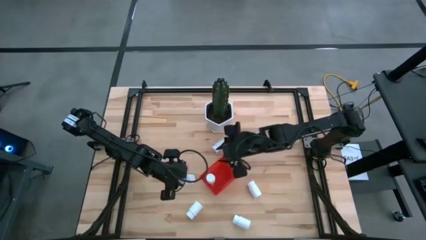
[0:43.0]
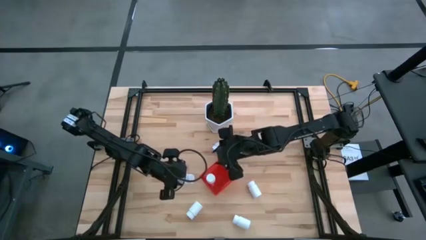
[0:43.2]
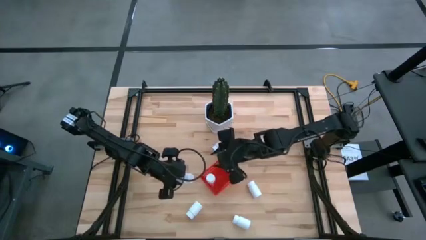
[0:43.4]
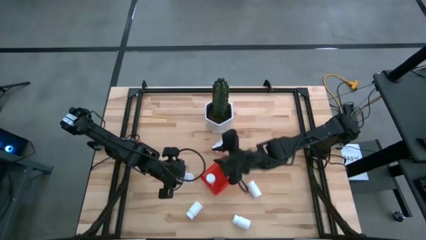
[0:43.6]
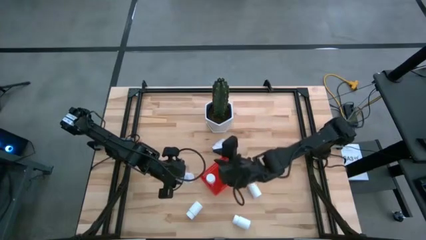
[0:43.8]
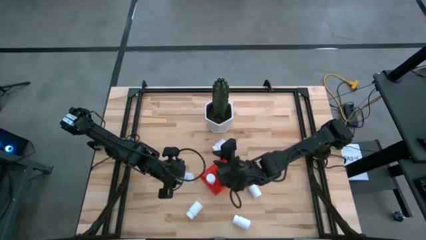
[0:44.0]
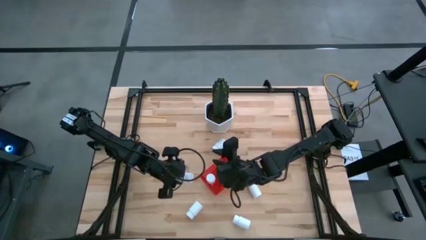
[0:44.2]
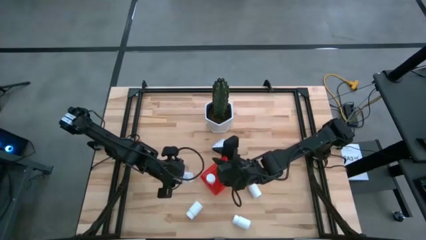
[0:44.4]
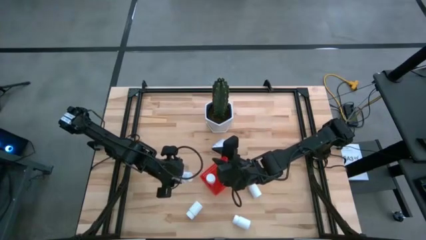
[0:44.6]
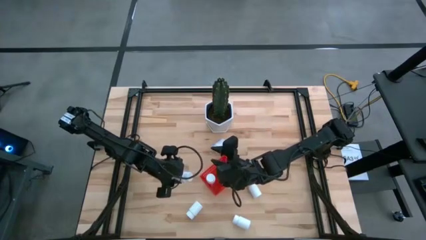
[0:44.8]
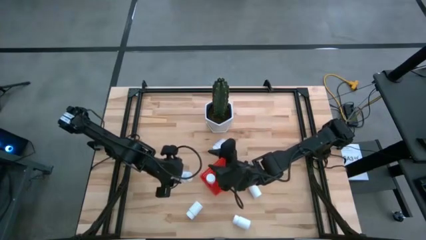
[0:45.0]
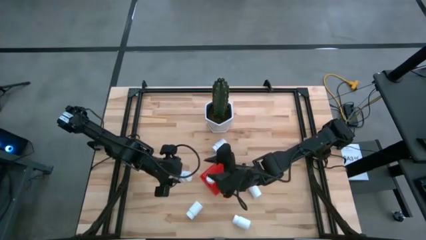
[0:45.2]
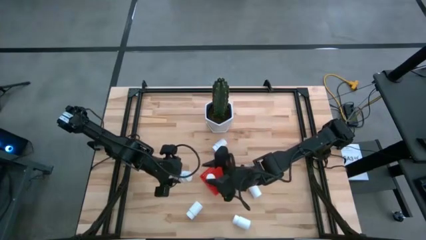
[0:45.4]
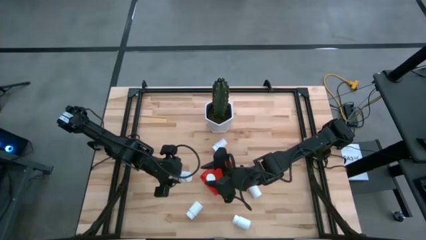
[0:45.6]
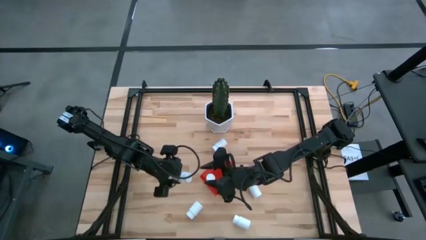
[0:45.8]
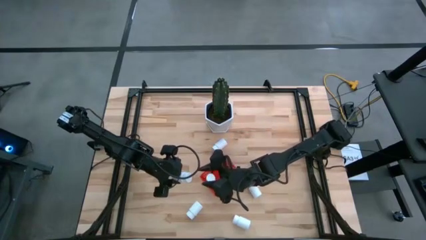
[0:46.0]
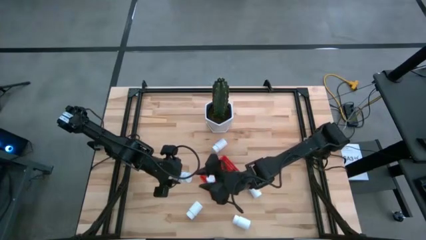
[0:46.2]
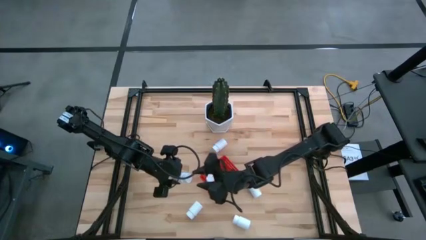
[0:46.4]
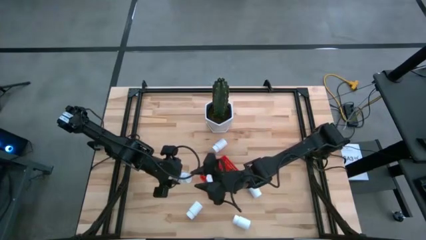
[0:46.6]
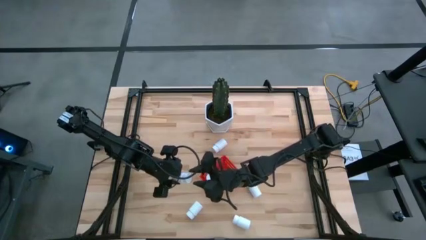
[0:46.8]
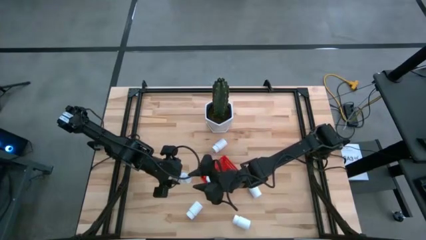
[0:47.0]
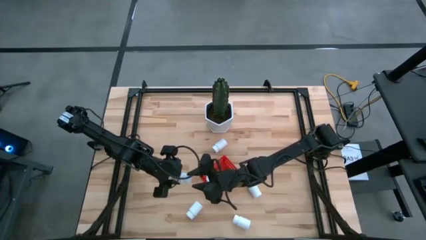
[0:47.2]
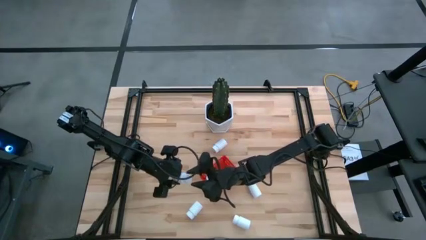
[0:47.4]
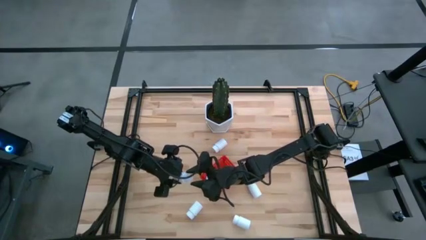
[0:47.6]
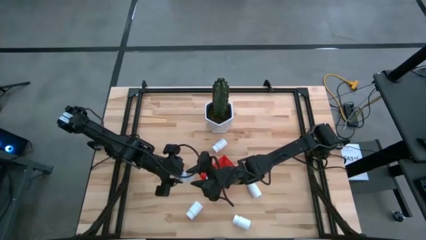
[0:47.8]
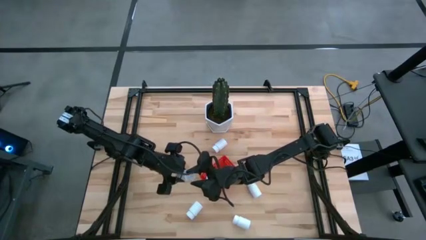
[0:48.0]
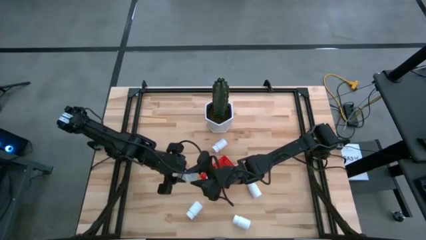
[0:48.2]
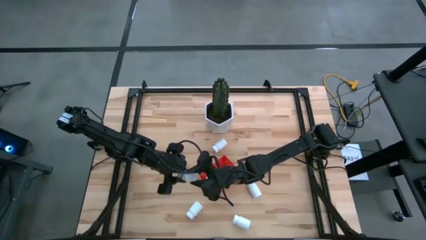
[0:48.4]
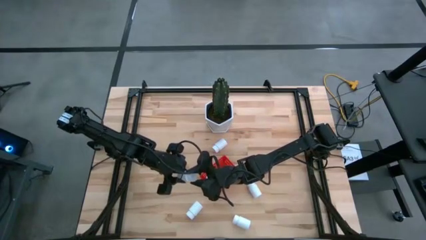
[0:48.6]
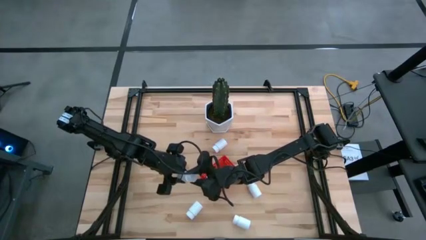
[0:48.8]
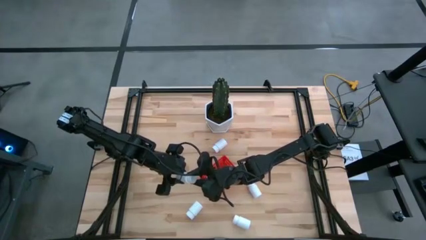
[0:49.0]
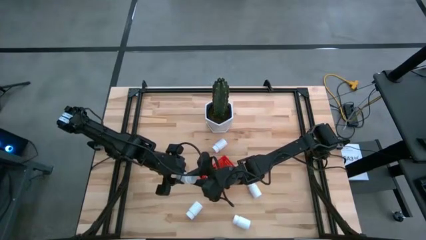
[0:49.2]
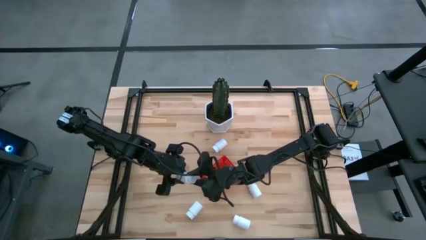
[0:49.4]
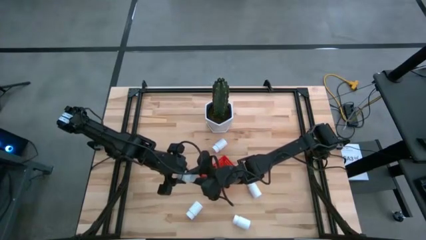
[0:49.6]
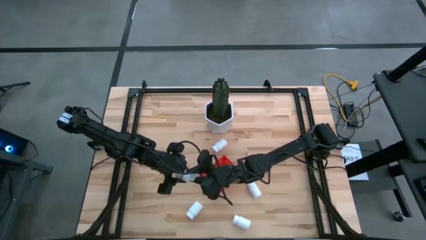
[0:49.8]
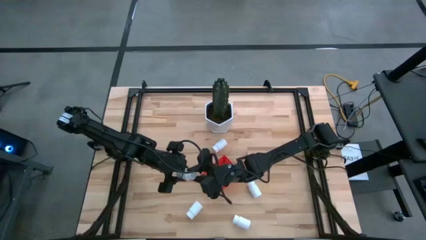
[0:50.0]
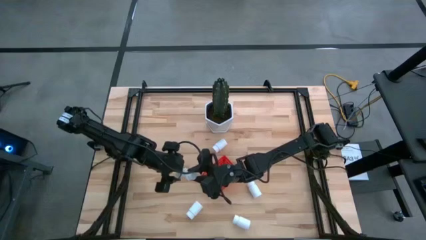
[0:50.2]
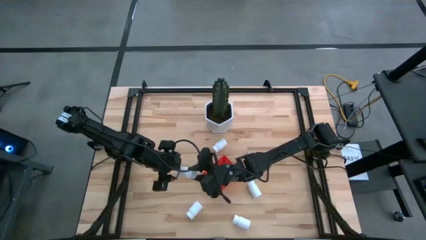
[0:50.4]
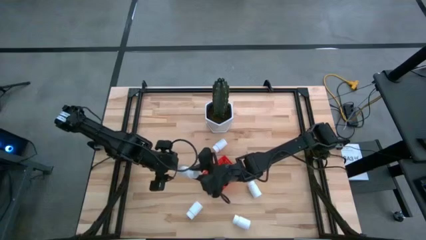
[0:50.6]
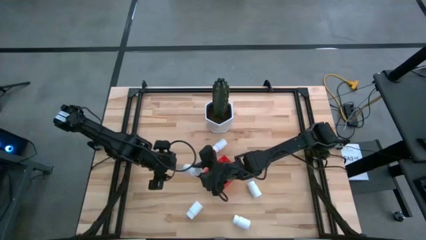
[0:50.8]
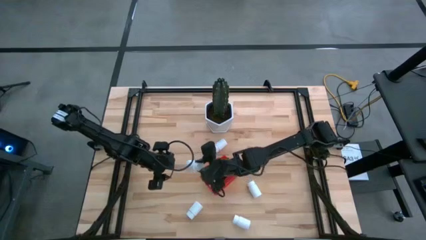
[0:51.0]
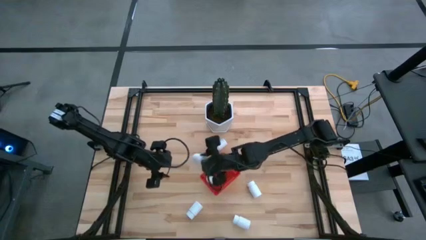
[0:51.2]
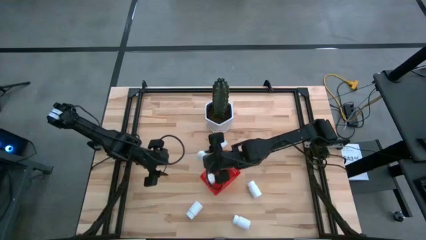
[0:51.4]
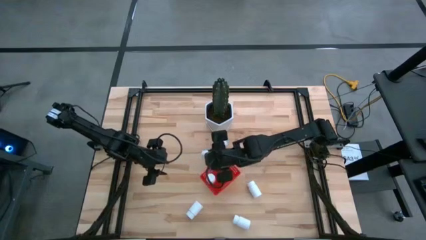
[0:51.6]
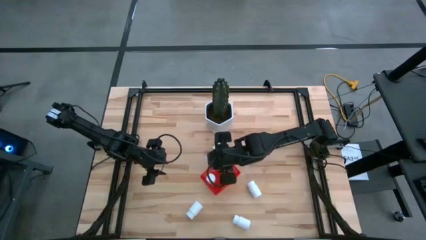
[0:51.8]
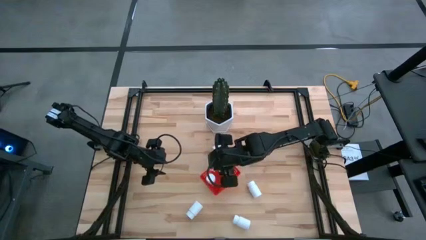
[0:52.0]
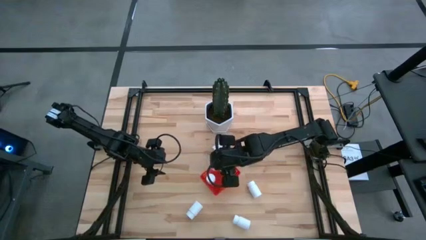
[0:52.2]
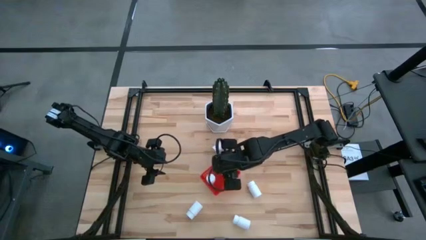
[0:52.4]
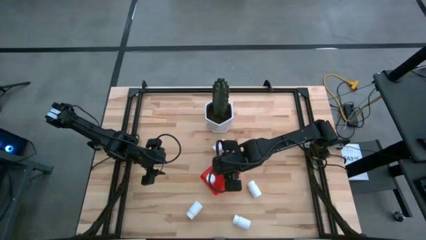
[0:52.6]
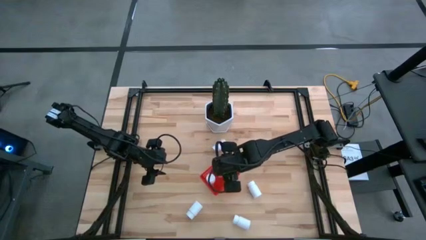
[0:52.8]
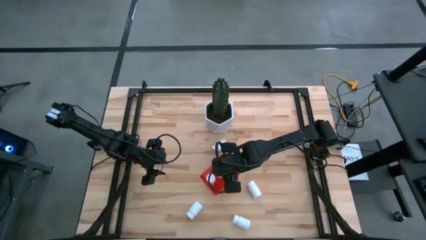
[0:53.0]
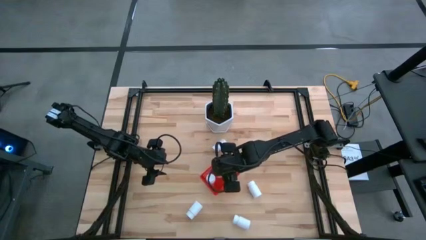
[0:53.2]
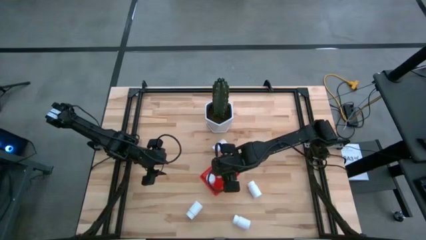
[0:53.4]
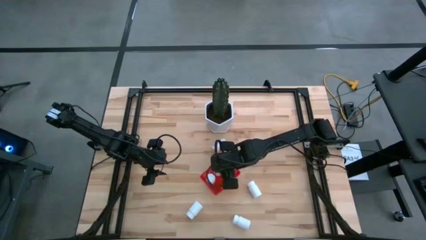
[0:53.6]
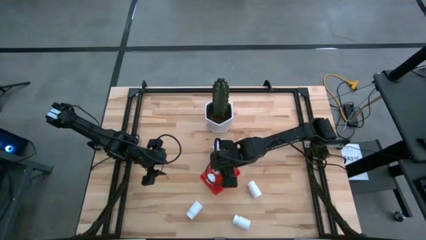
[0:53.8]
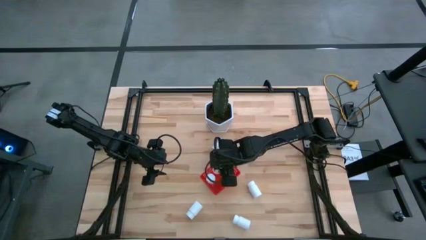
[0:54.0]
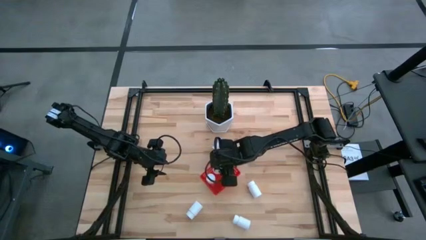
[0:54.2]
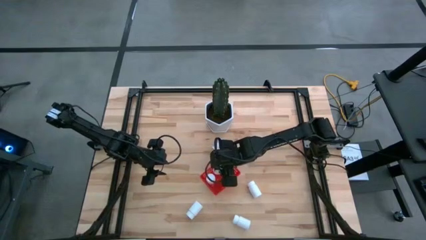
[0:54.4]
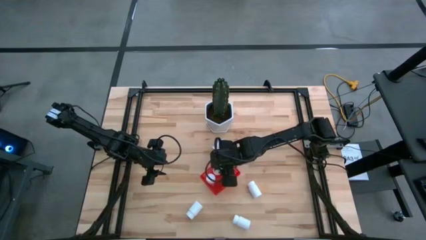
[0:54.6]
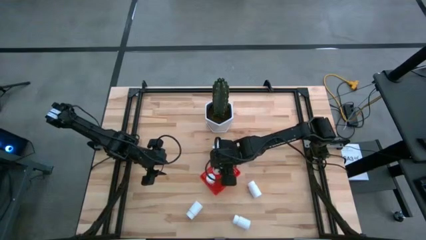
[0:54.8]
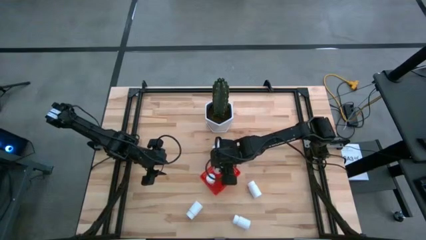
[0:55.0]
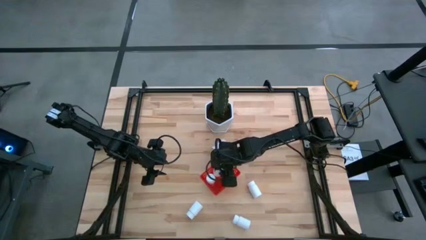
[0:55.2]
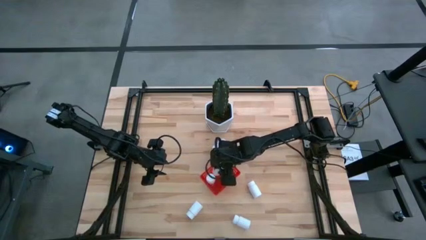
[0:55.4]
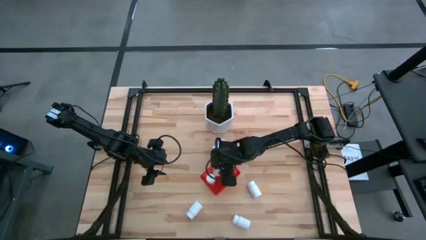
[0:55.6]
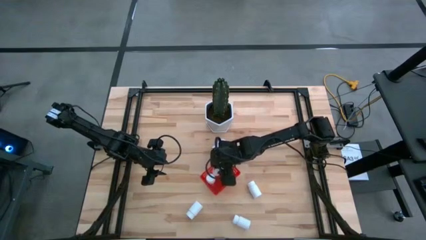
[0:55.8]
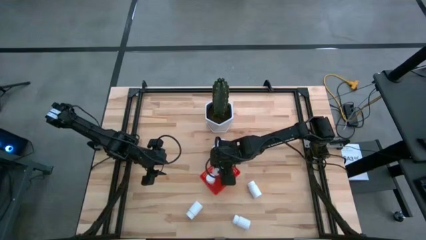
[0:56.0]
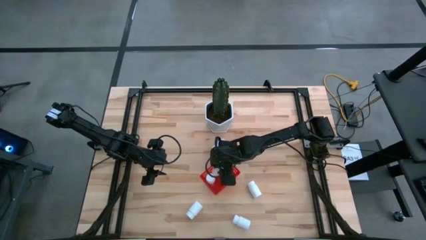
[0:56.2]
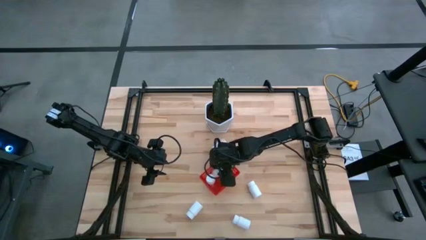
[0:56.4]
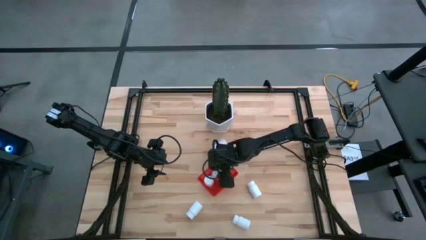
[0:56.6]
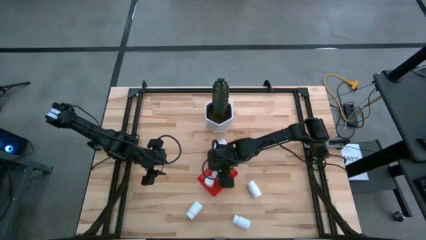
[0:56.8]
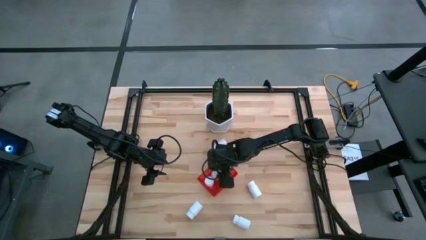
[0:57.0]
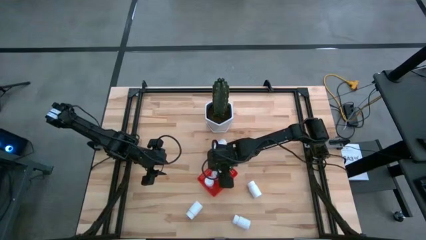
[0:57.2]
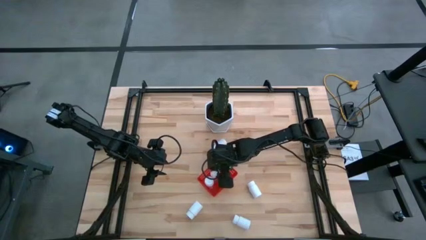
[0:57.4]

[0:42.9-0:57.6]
Task: Pick and place pill bottles into a basket
Put the white pill bottle into the red bin
